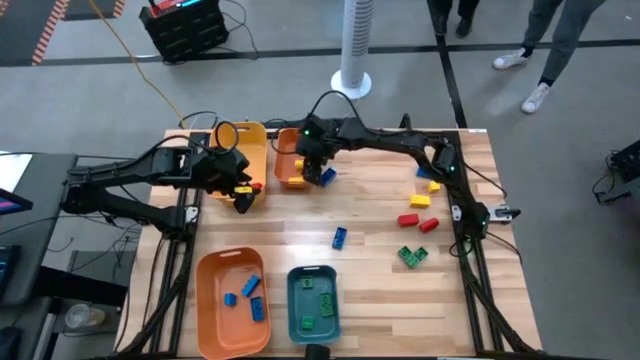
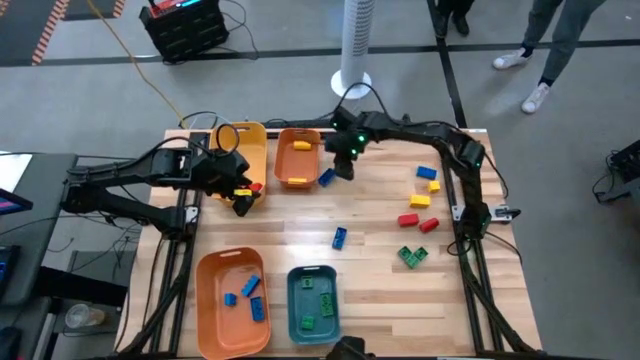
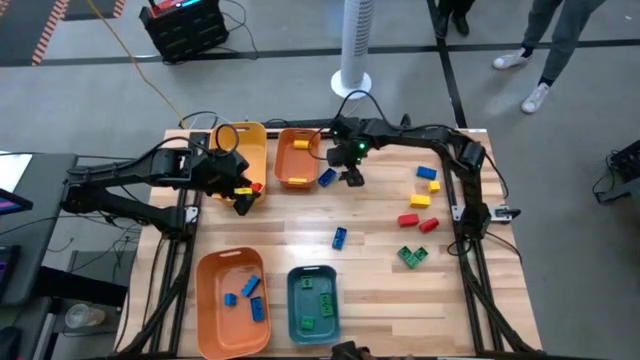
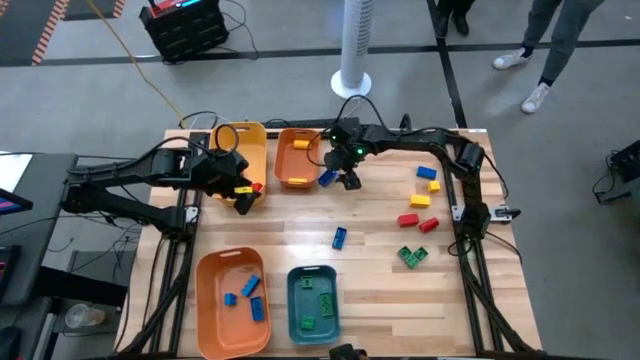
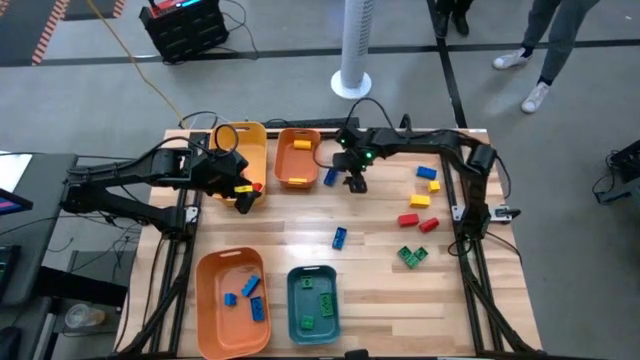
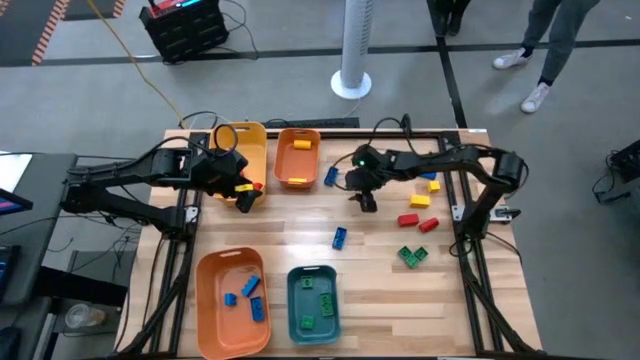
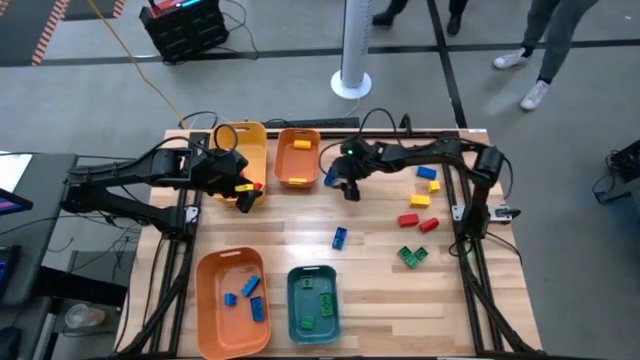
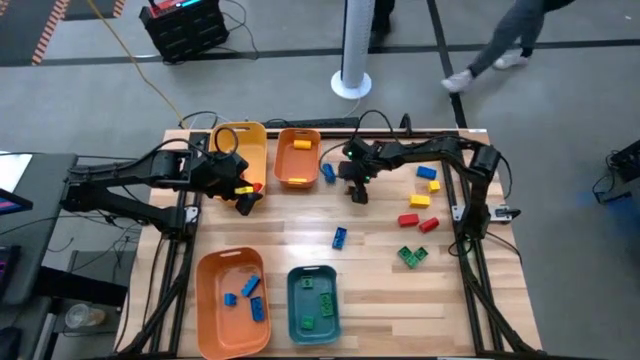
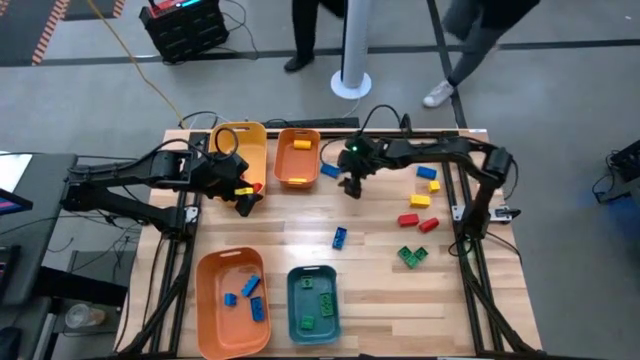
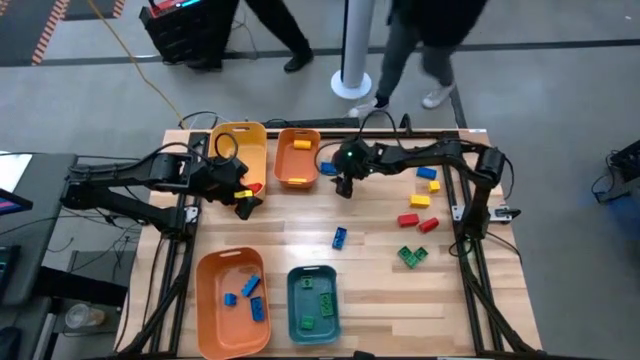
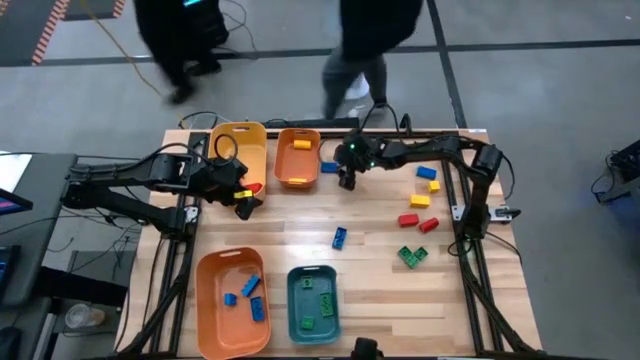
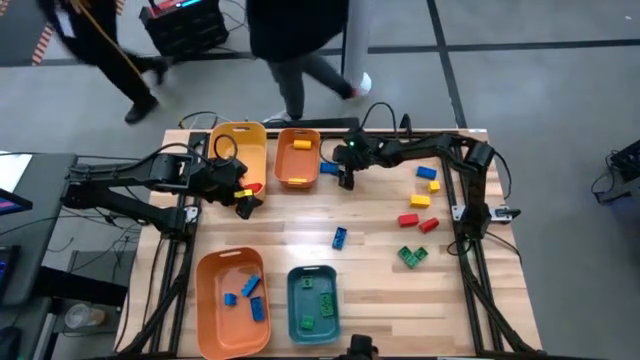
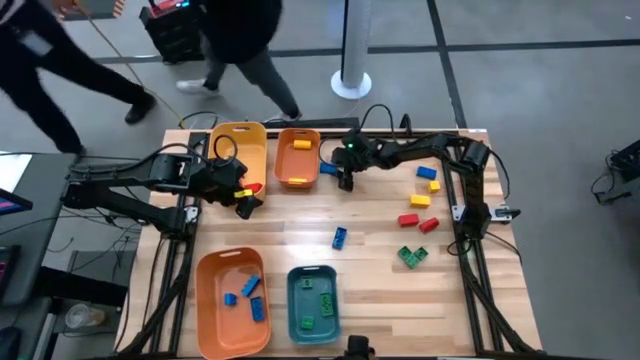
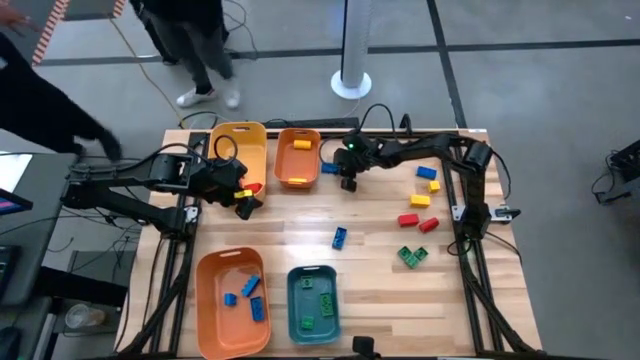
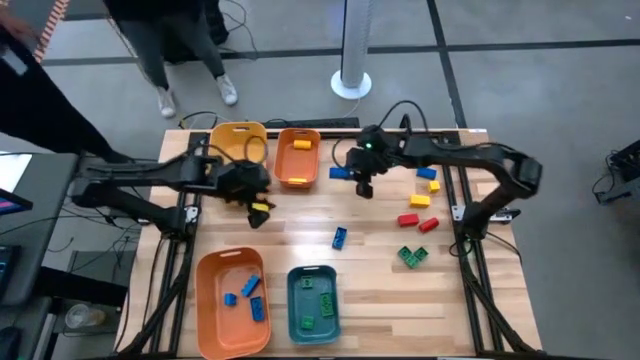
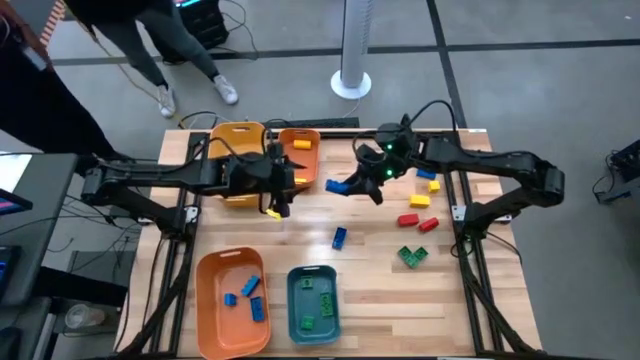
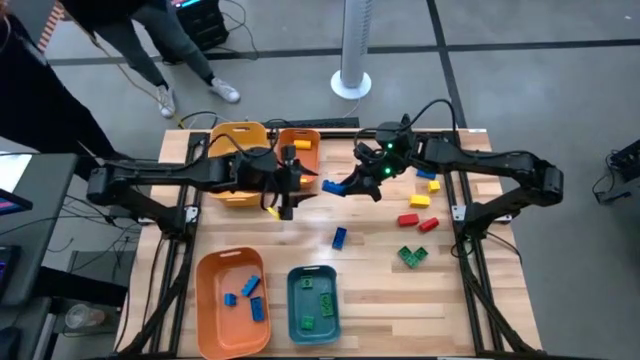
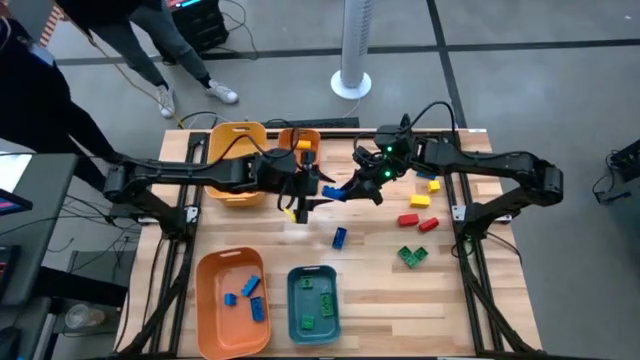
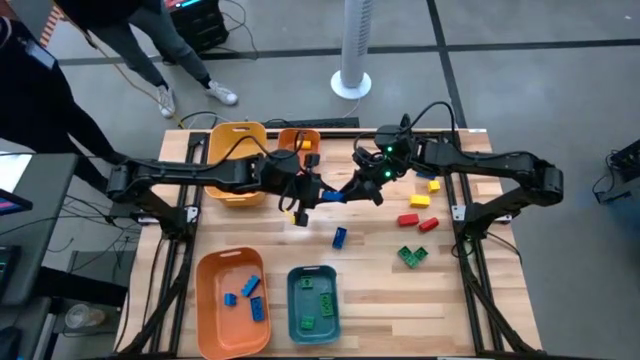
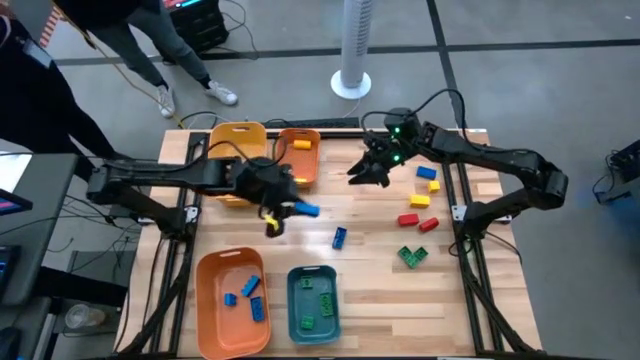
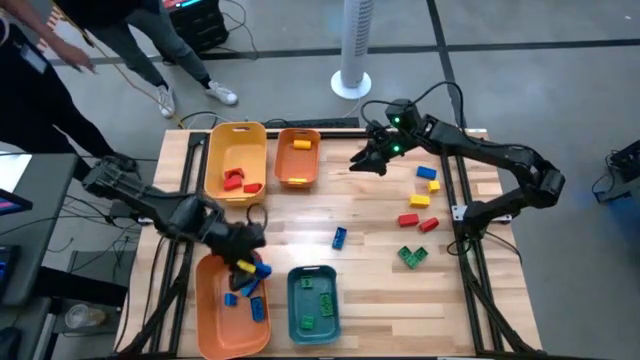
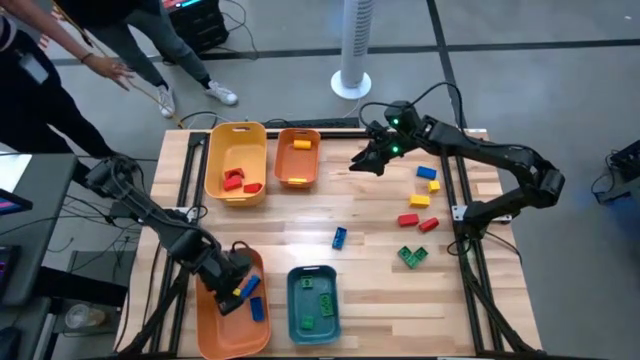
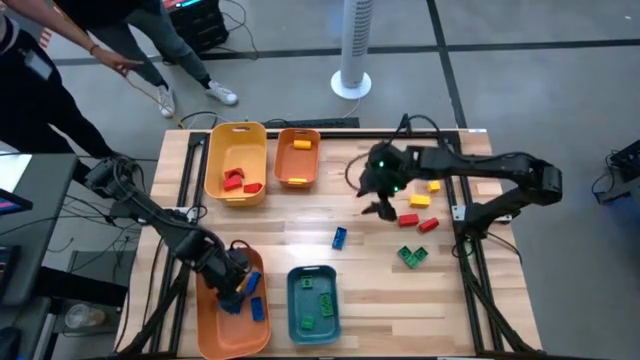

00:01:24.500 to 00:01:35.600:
Task: Sort blocks
Put the blue game piece into the large orange bin

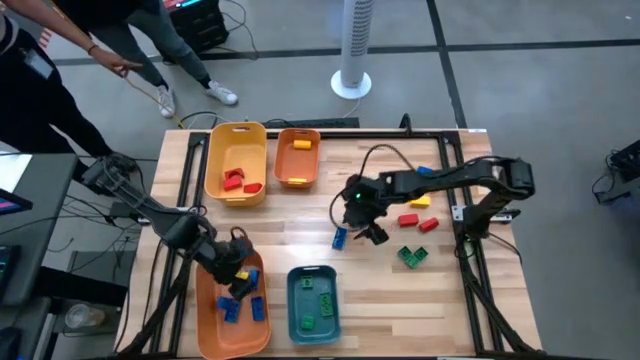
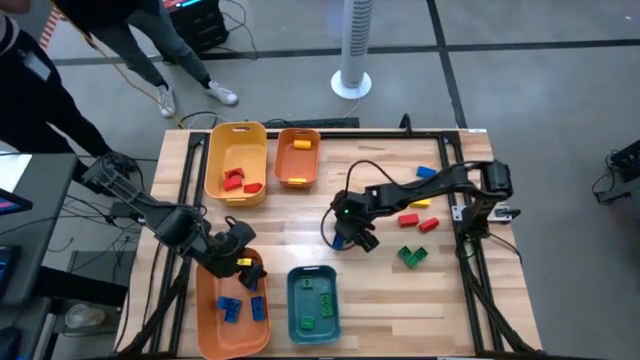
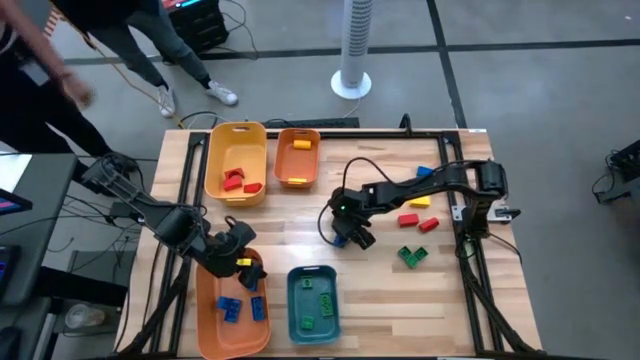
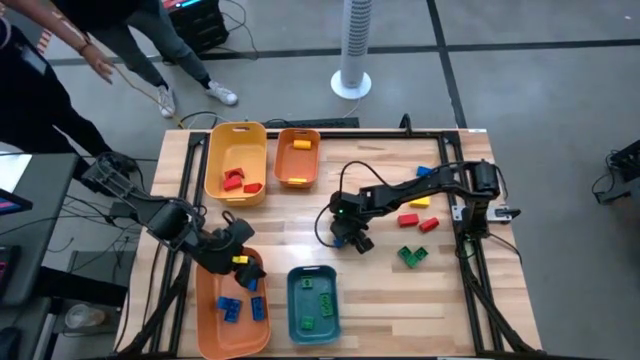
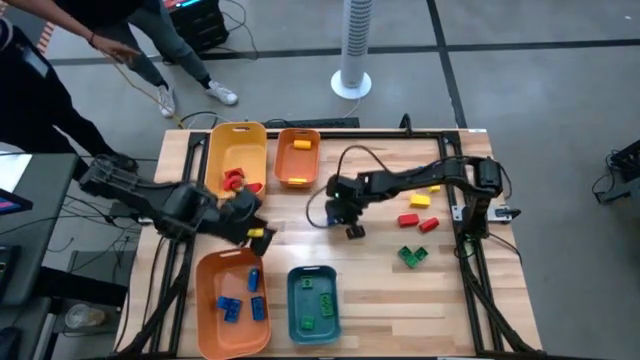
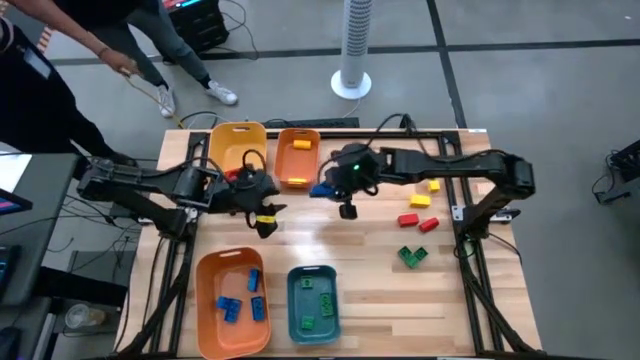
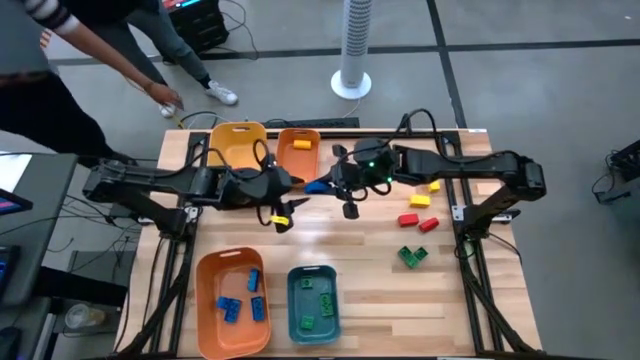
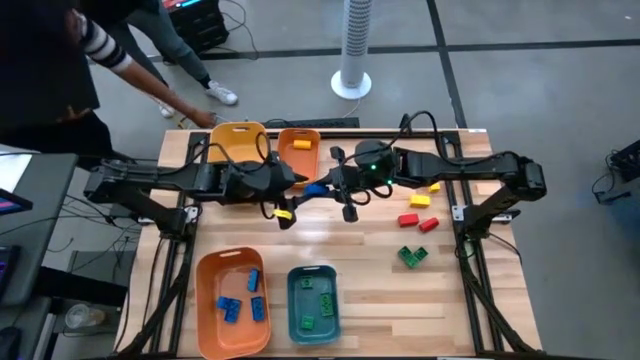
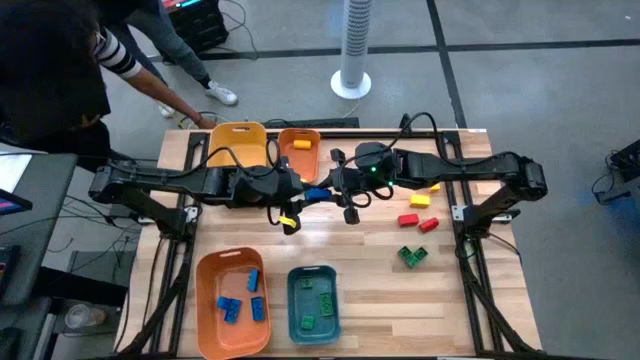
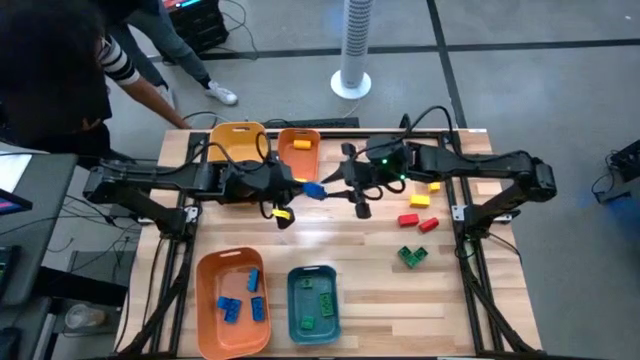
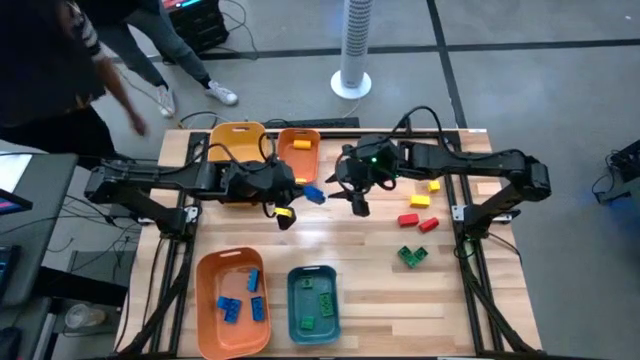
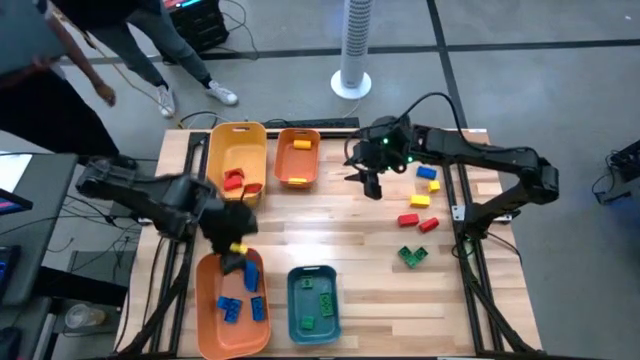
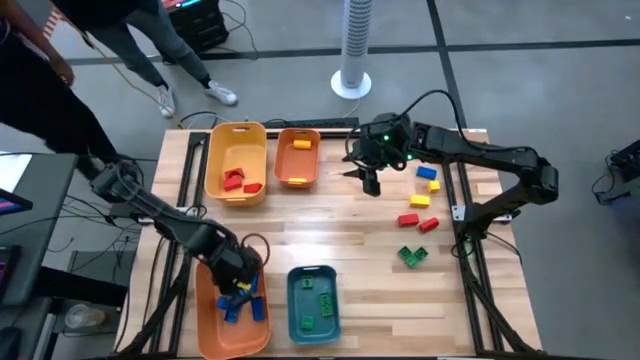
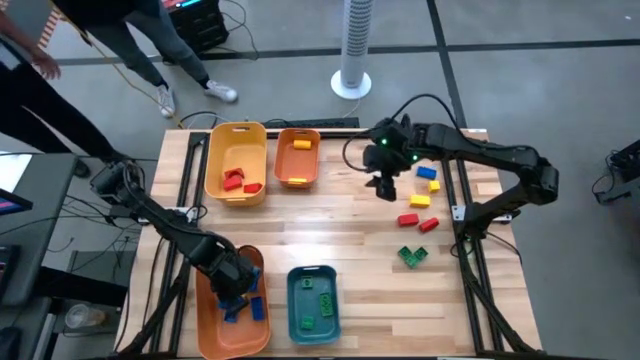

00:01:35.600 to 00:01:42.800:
Put the blue game piece into the large orange bin

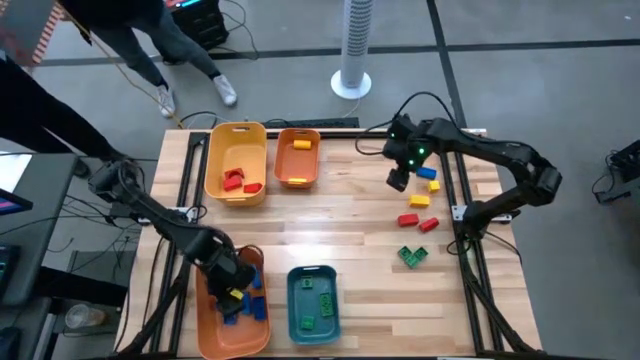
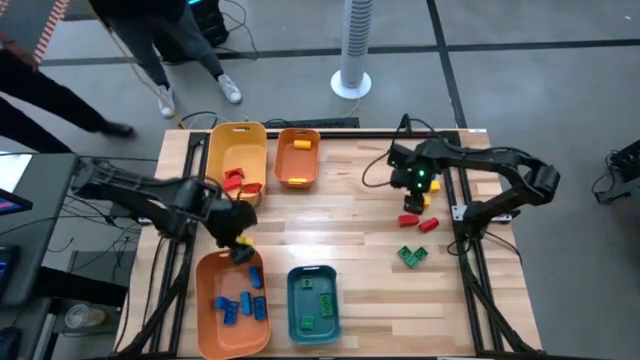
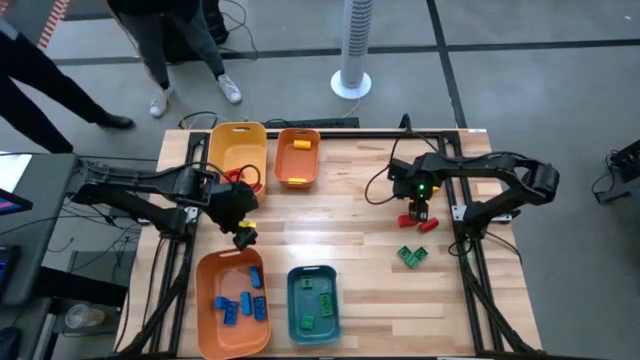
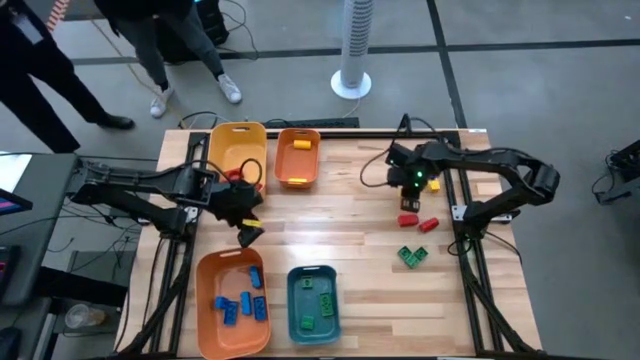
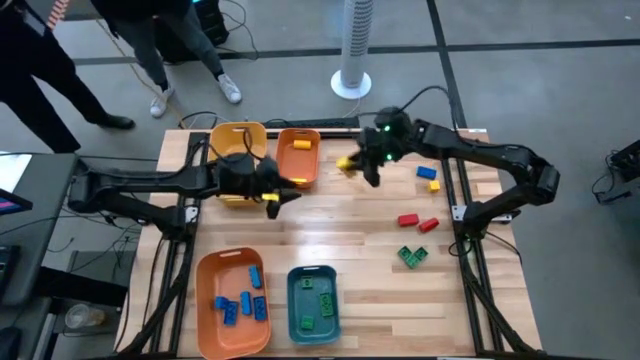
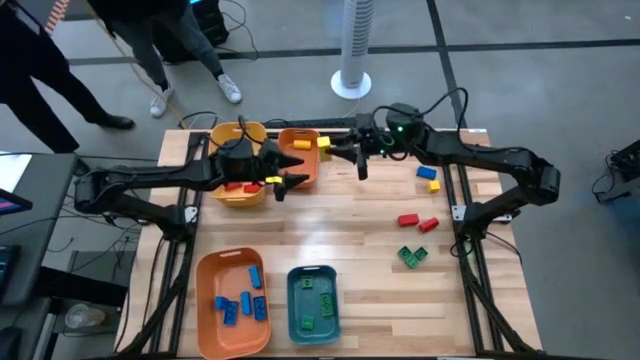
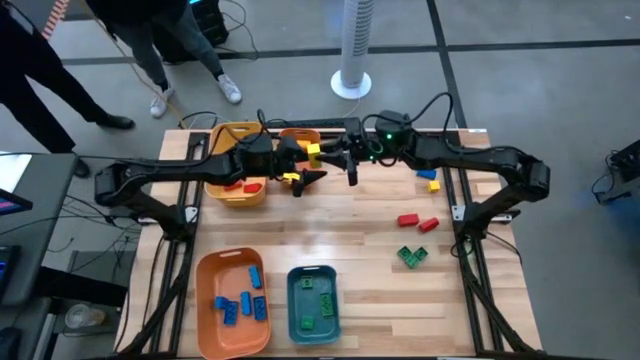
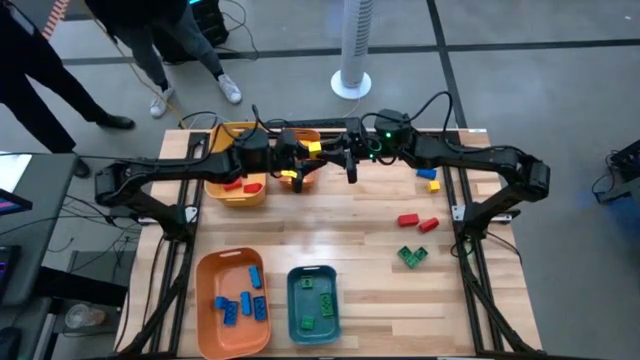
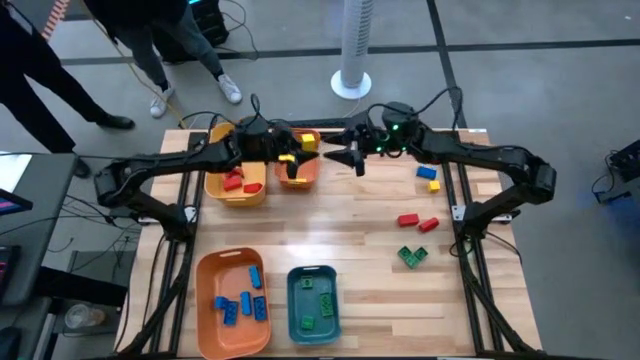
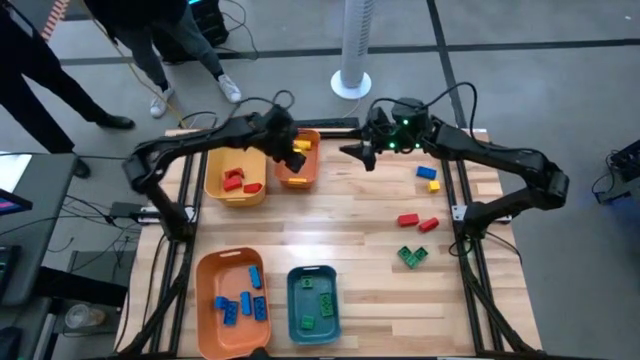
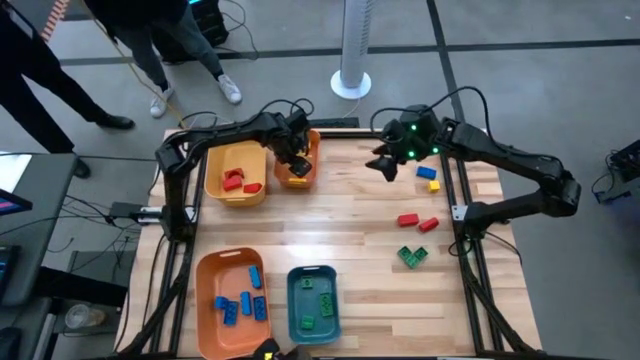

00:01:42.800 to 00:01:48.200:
Put the yellow wooden block into the small orange bin
